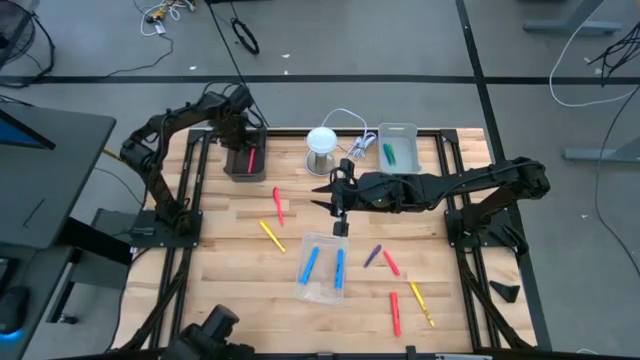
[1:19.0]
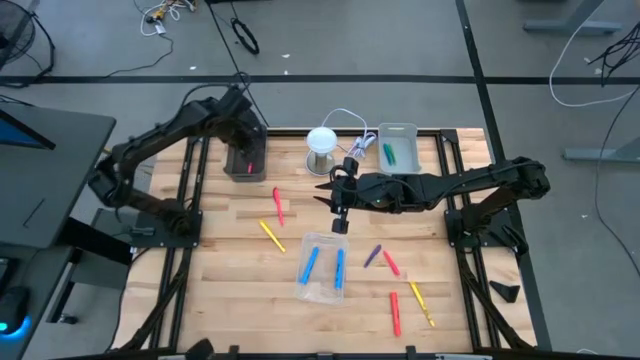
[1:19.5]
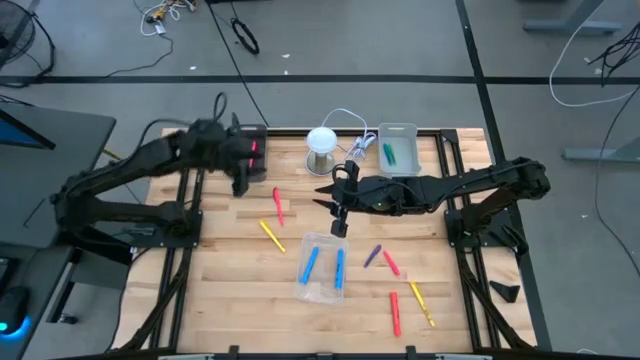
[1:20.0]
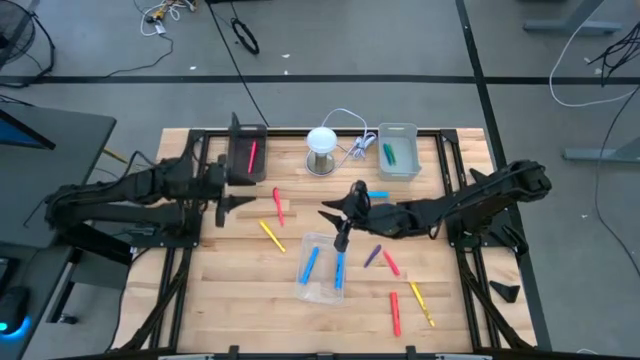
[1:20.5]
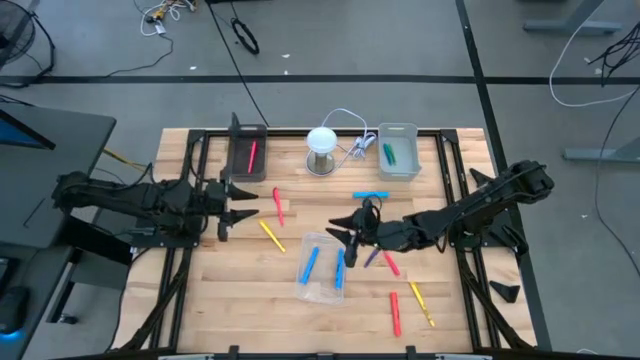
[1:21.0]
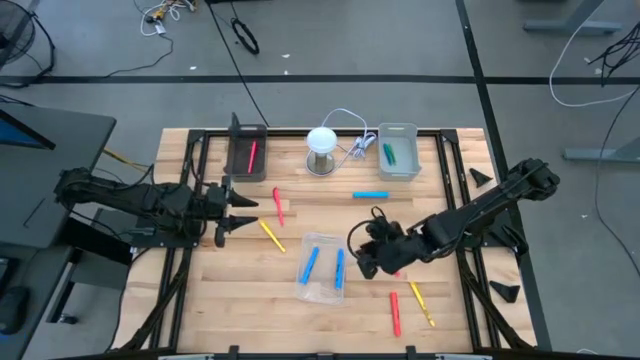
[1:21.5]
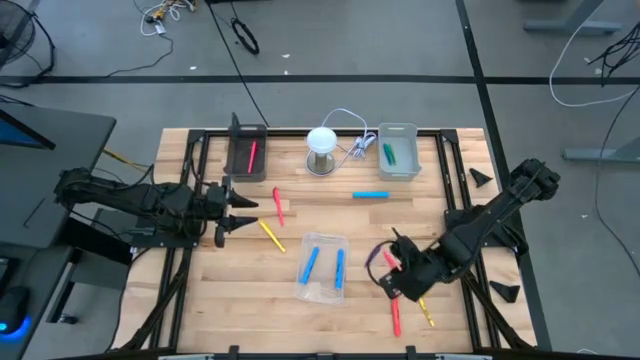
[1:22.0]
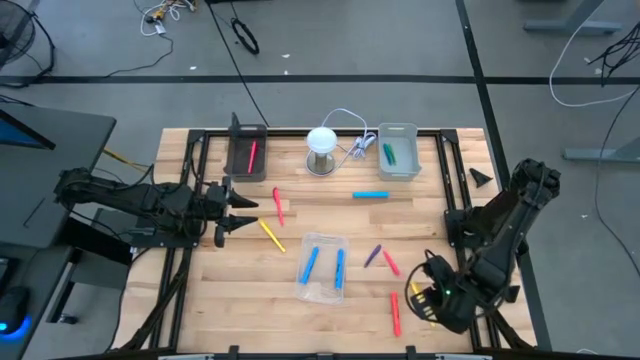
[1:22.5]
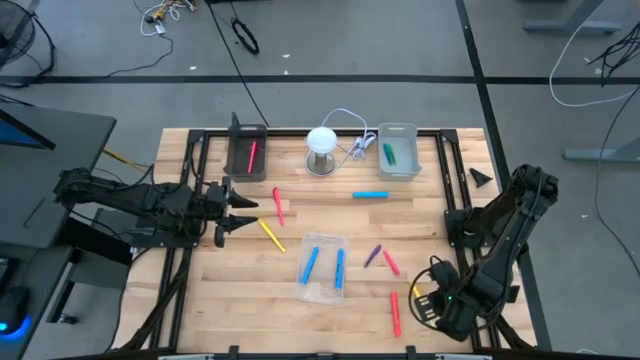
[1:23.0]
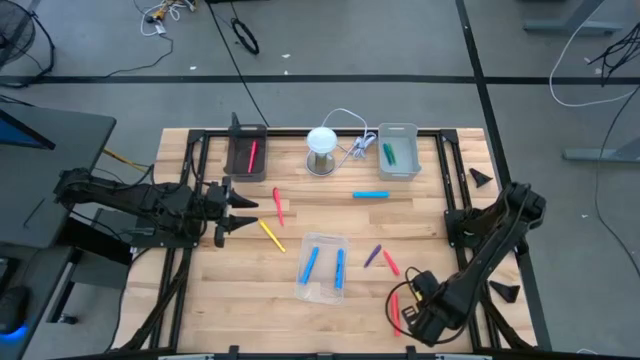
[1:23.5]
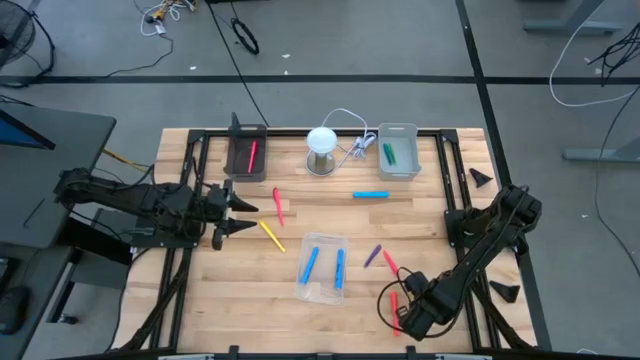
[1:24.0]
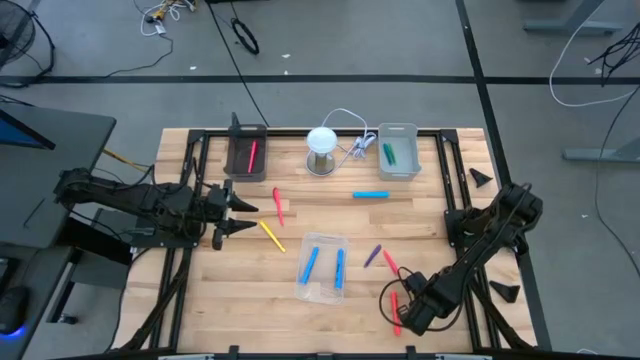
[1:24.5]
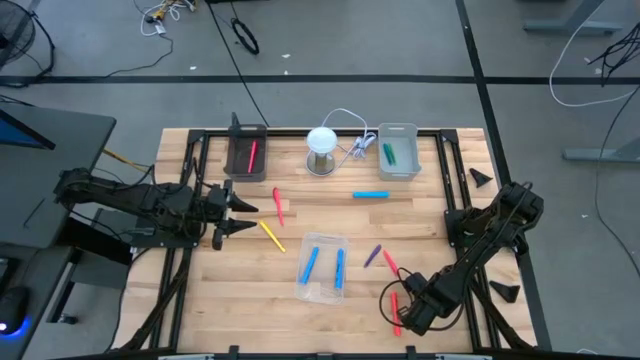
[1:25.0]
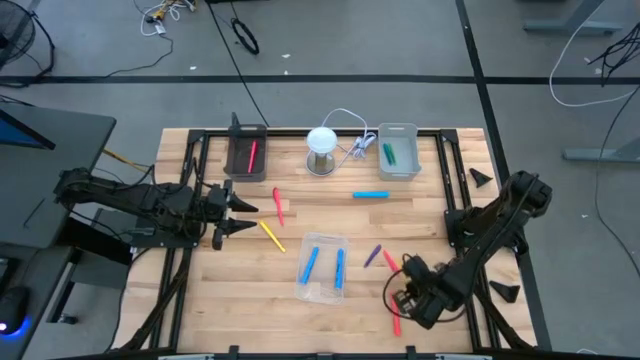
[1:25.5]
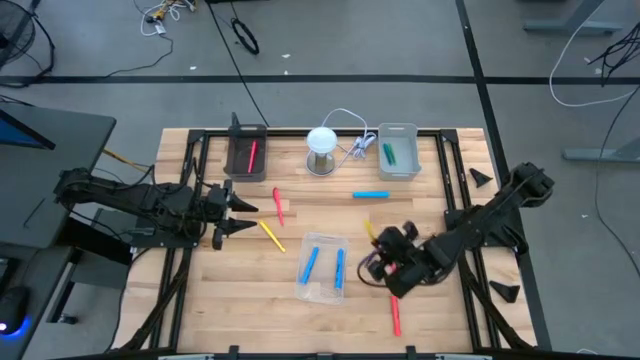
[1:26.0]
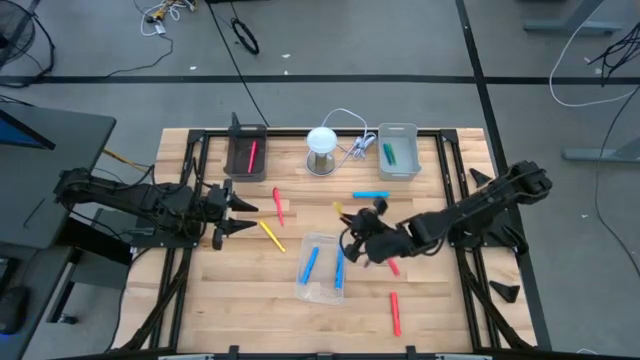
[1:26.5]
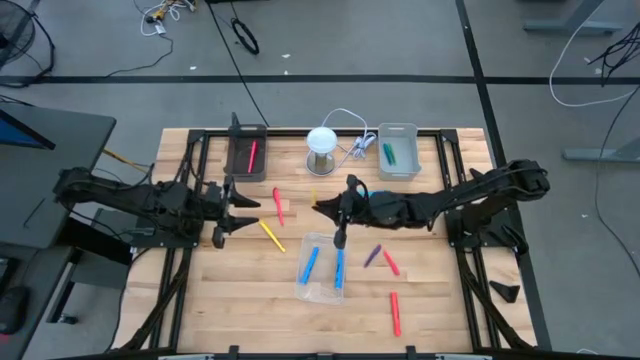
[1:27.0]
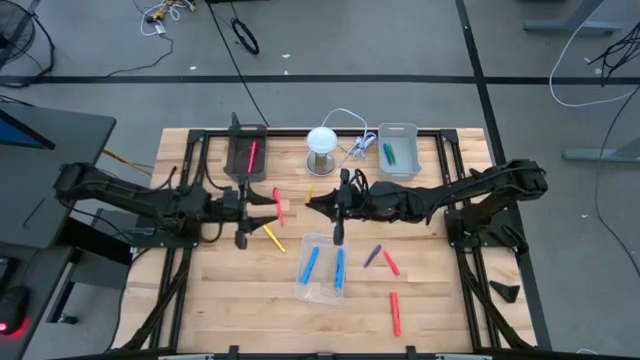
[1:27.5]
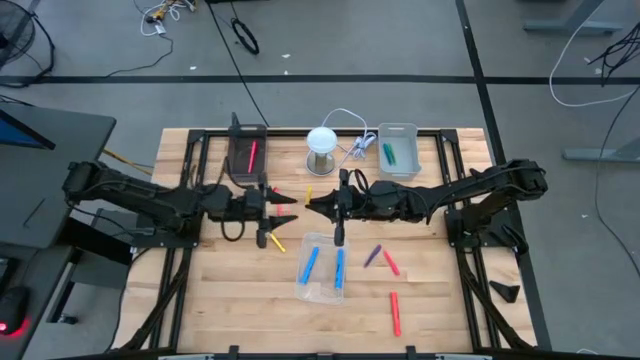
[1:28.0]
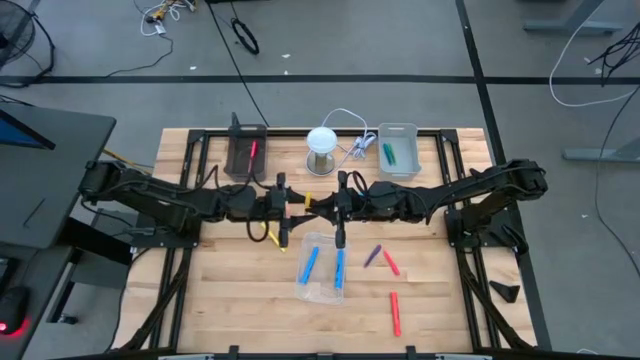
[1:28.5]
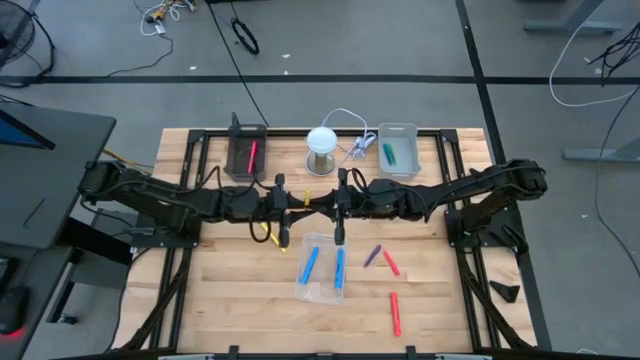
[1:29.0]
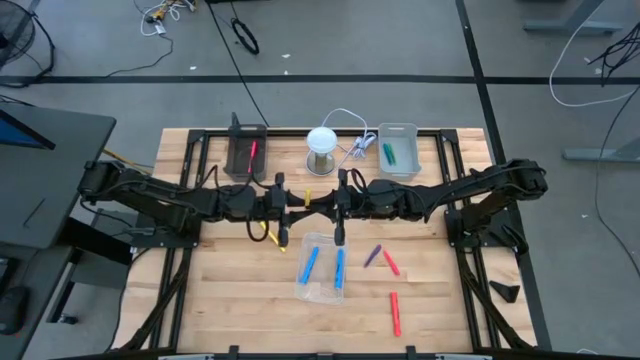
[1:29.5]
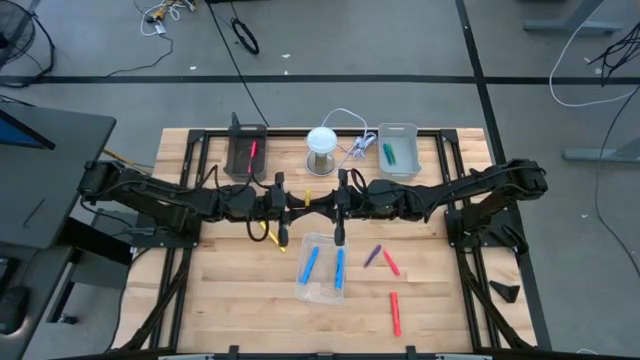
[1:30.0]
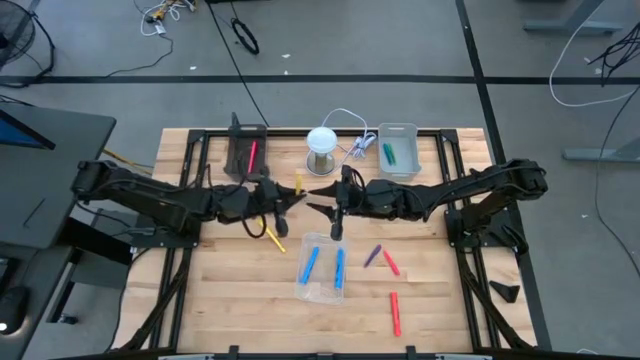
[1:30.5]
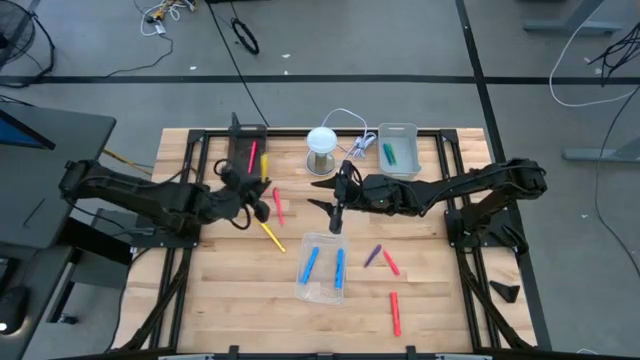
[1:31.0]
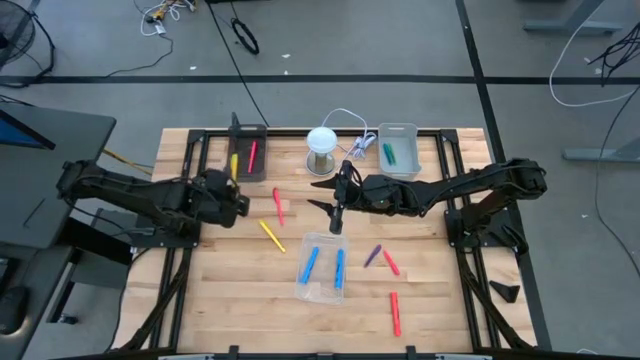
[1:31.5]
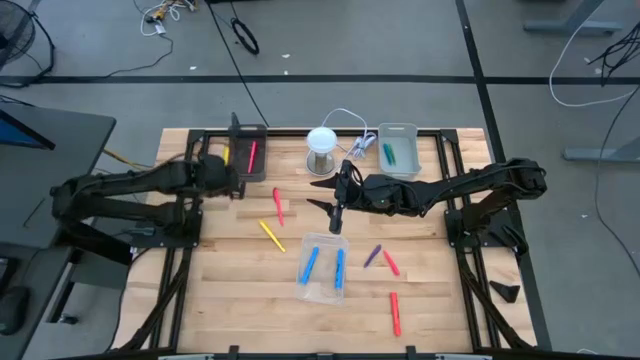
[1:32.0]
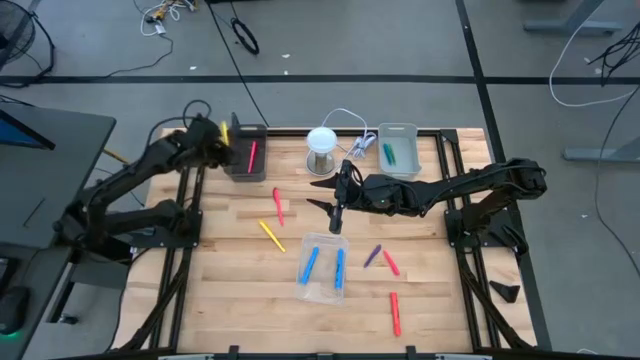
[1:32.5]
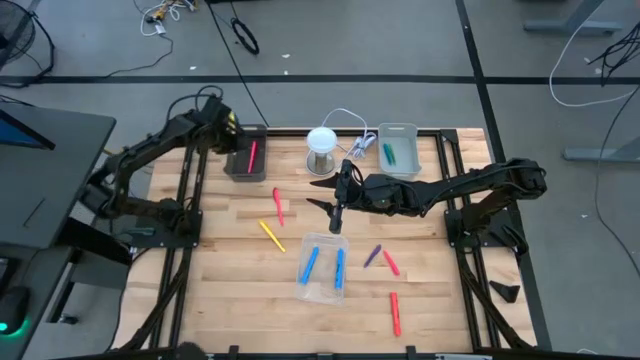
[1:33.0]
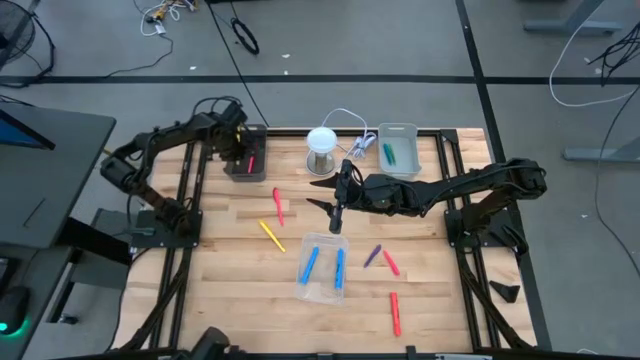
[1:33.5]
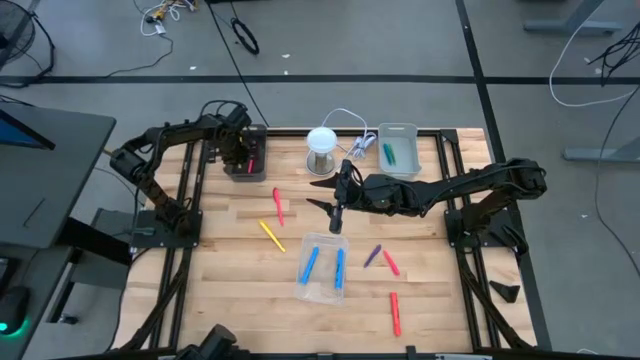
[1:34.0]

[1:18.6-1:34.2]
Task: Pick & Place Markers
Put the bottom yellow marker into the black bin

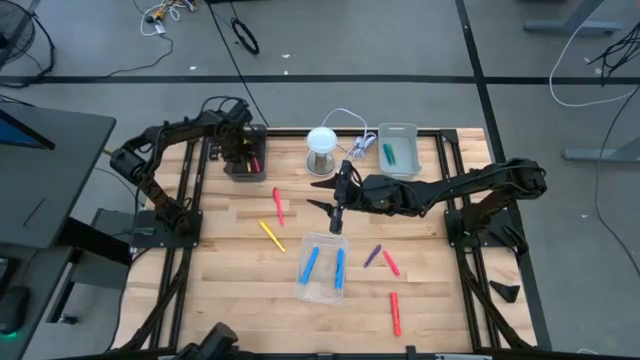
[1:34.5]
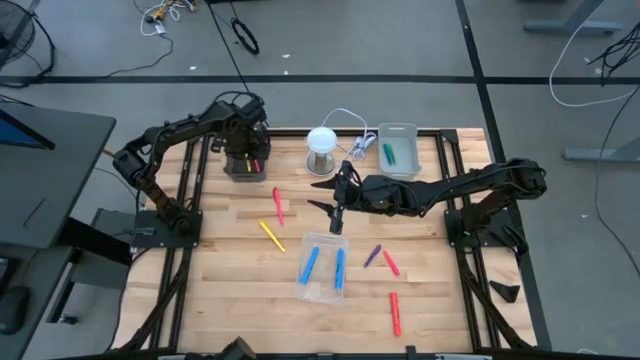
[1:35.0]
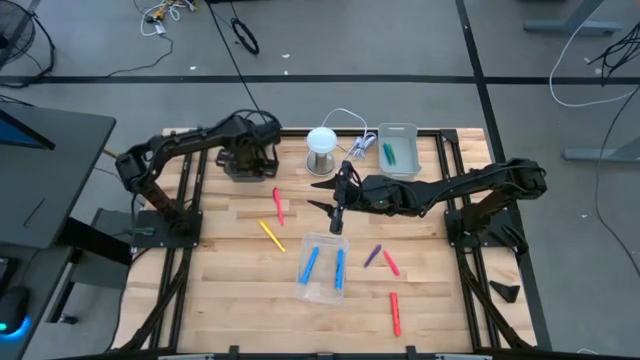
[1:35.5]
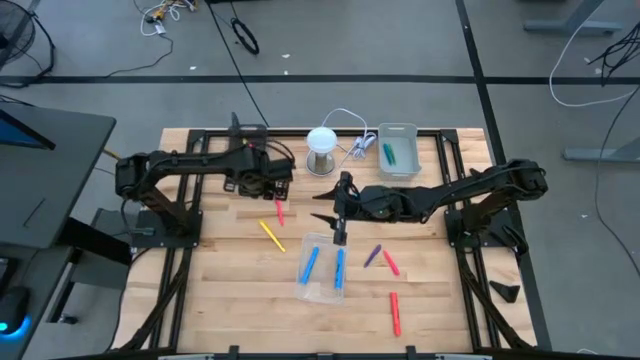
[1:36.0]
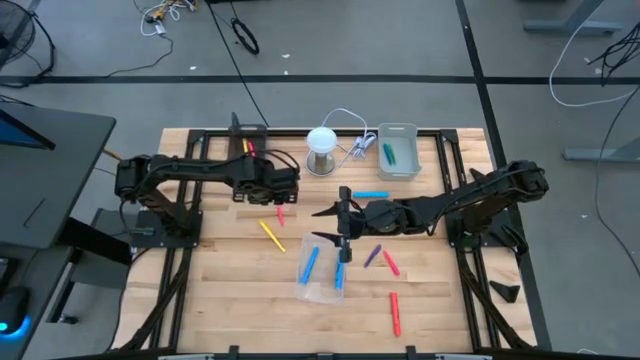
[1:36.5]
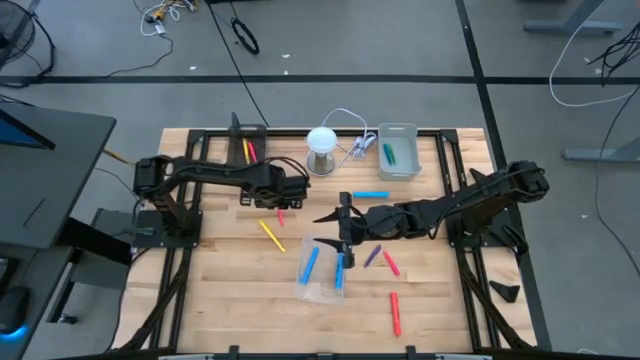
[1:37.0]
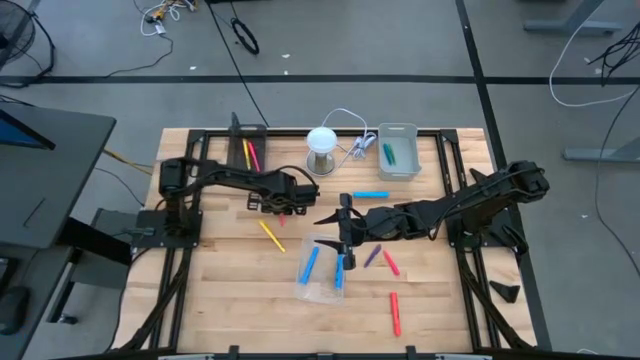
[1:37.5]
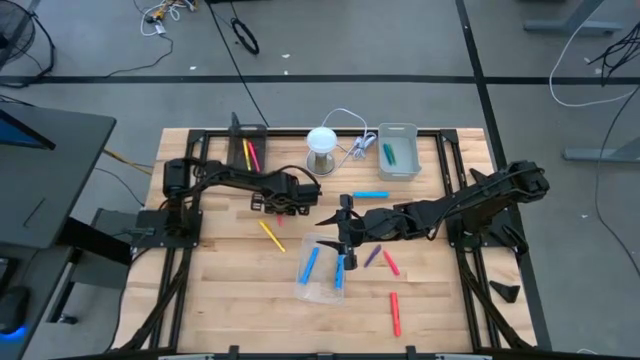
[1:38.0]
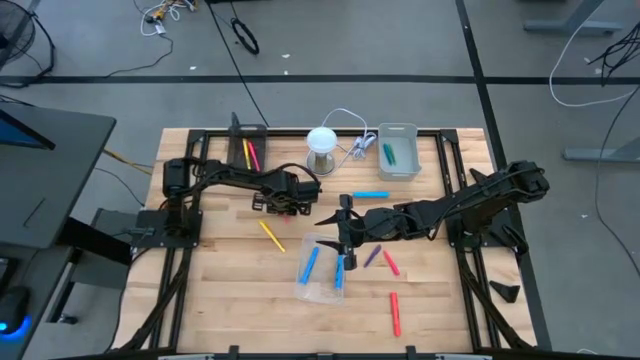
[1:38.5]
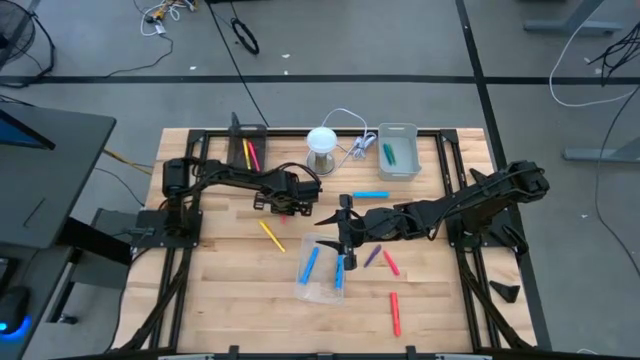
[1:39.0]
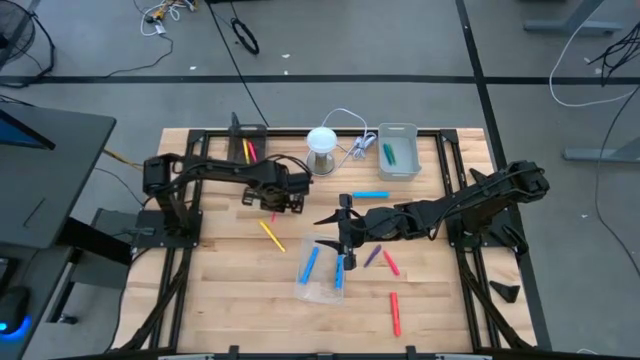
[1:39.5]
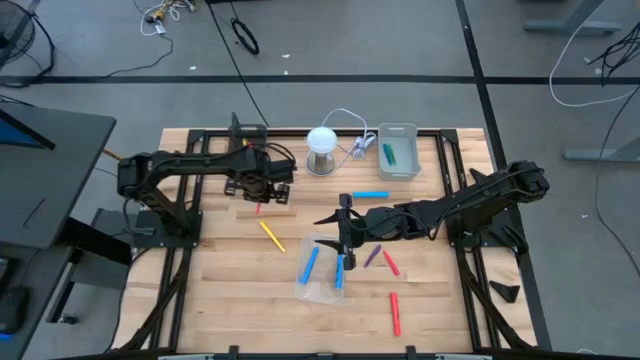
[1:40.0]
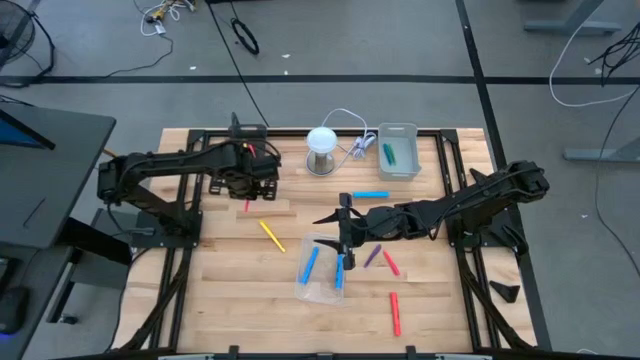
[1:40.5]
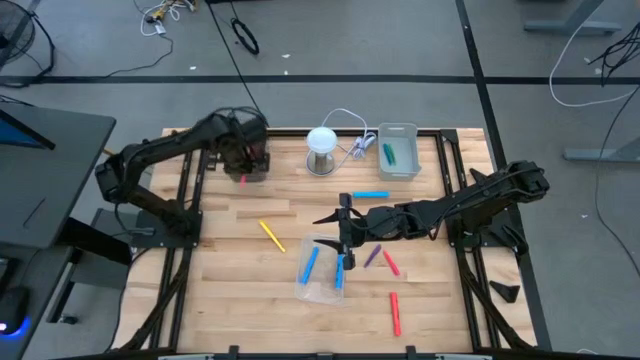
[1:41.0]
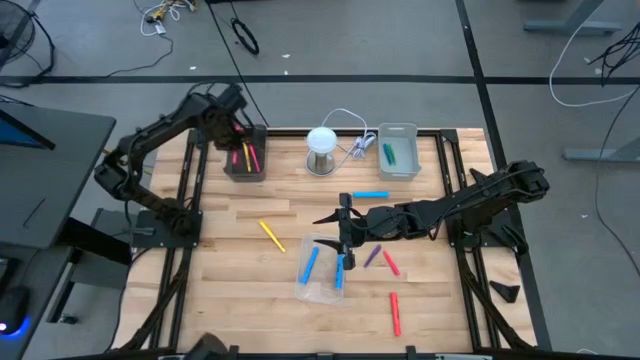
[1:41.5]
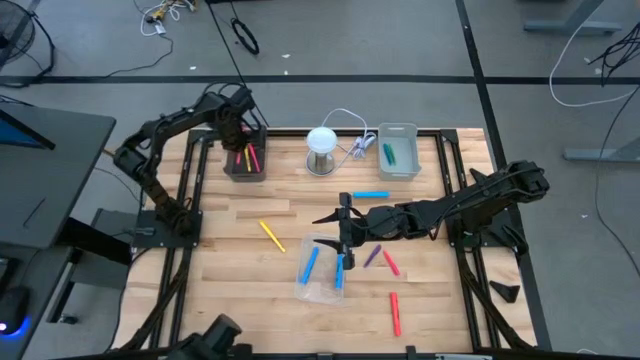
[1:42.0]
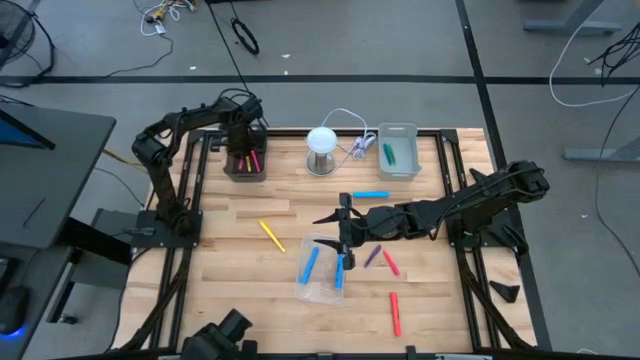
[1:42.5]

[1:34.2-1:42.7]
Put the pink marker into the black bin
